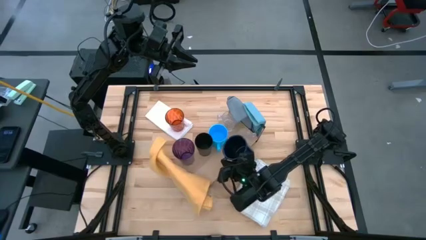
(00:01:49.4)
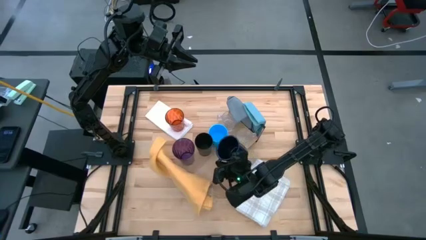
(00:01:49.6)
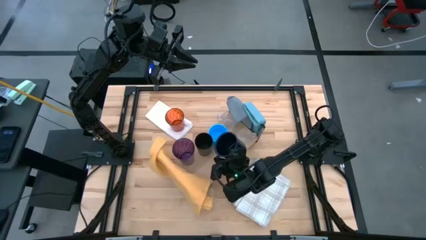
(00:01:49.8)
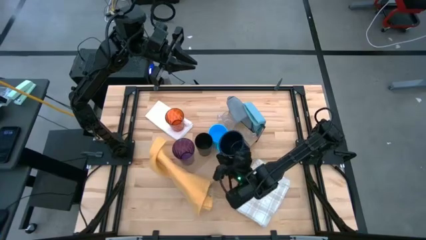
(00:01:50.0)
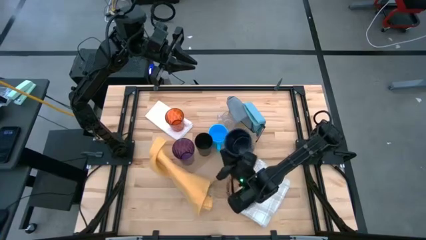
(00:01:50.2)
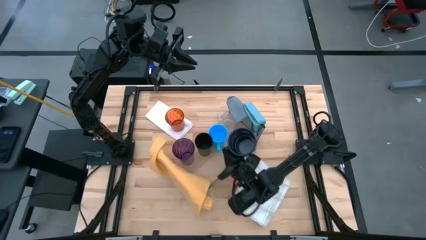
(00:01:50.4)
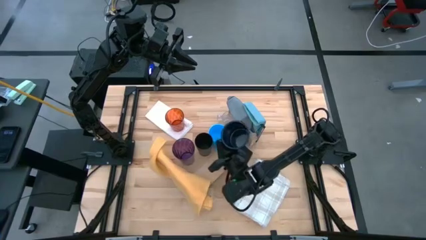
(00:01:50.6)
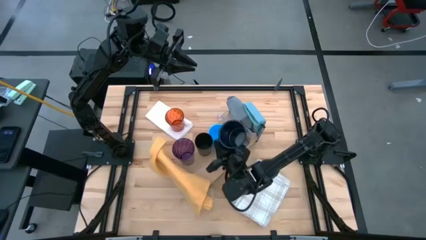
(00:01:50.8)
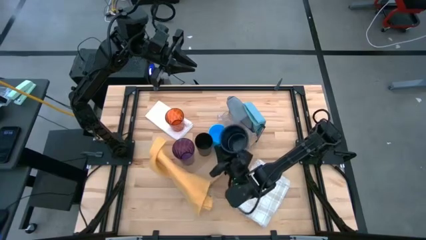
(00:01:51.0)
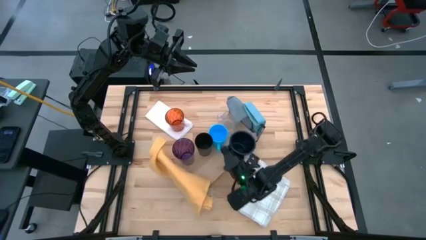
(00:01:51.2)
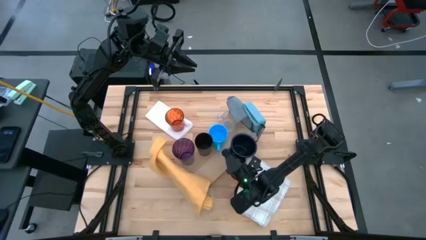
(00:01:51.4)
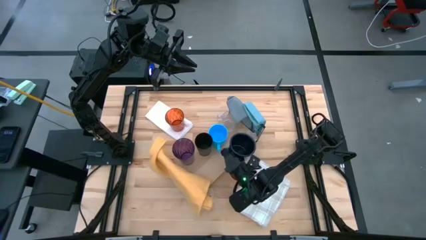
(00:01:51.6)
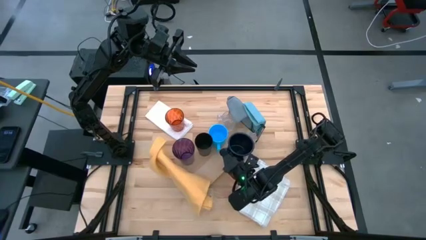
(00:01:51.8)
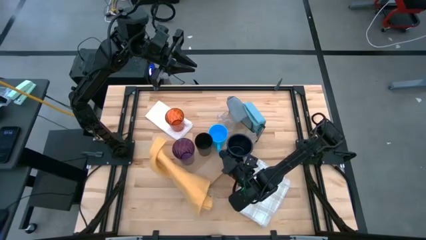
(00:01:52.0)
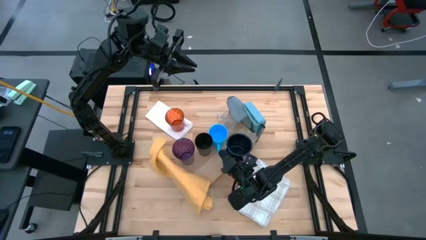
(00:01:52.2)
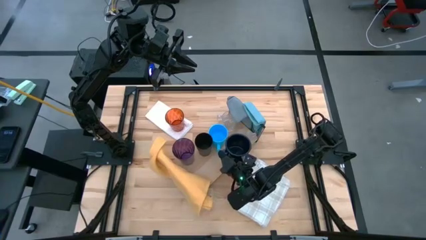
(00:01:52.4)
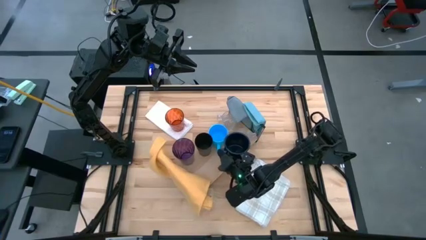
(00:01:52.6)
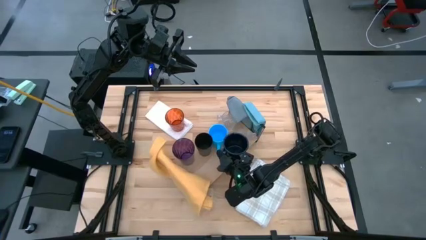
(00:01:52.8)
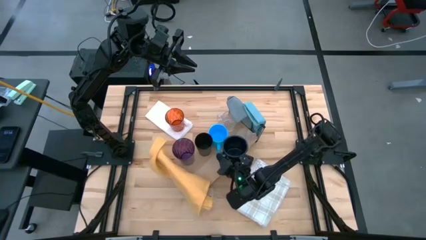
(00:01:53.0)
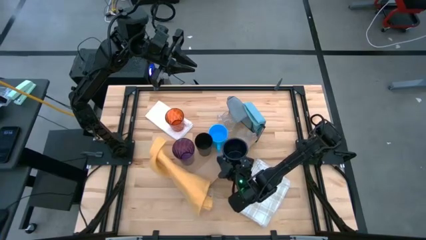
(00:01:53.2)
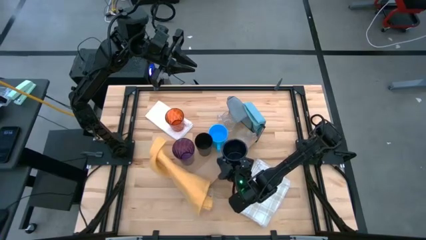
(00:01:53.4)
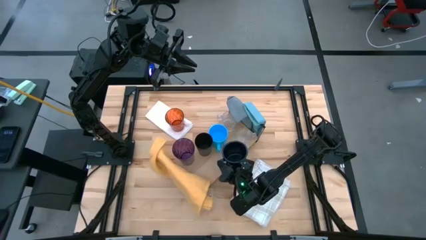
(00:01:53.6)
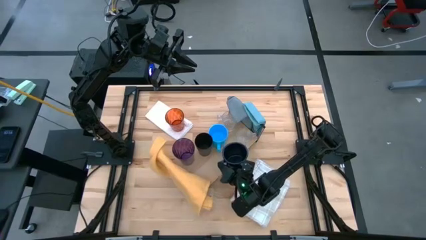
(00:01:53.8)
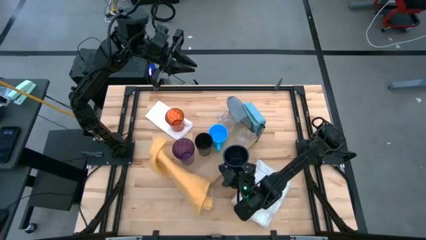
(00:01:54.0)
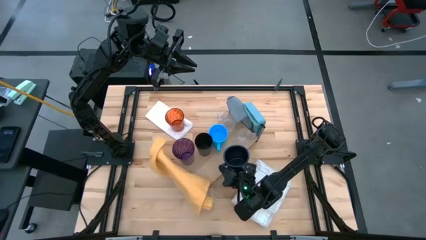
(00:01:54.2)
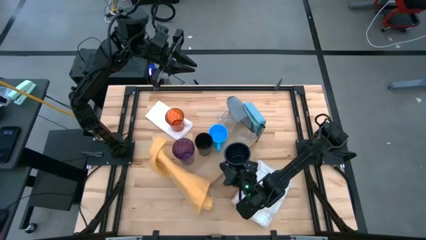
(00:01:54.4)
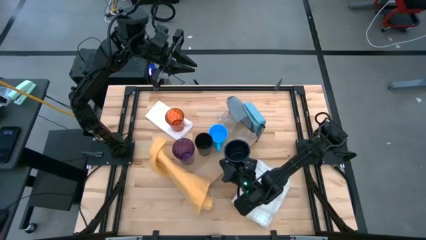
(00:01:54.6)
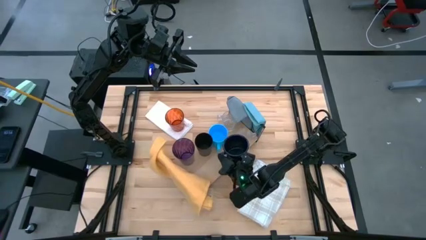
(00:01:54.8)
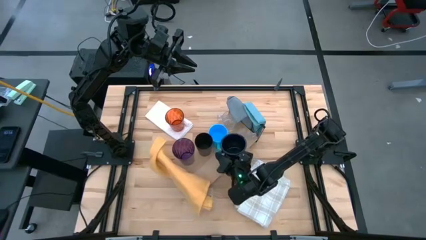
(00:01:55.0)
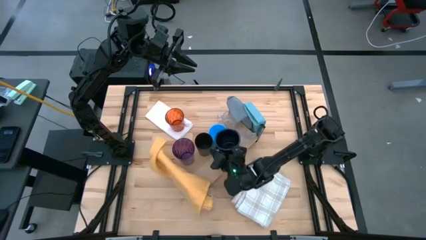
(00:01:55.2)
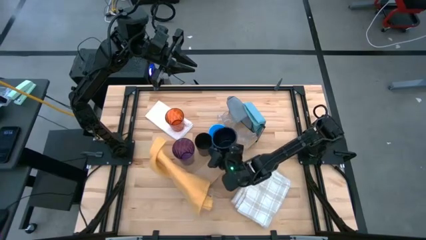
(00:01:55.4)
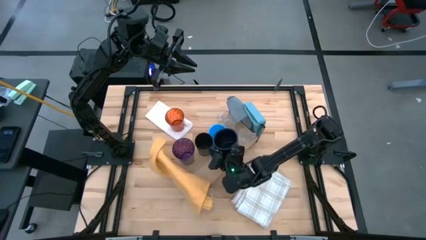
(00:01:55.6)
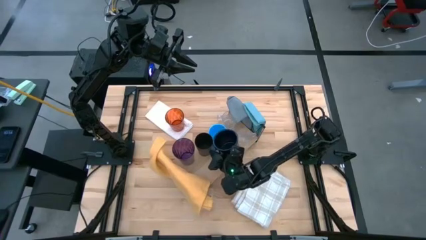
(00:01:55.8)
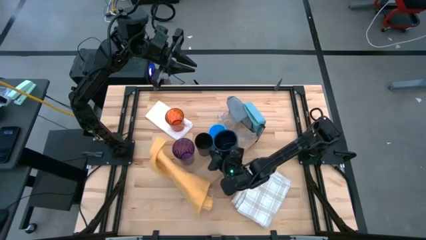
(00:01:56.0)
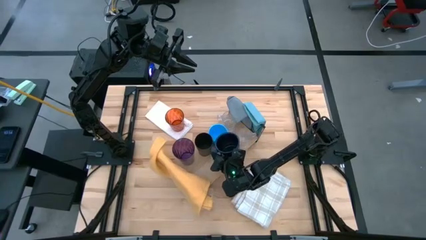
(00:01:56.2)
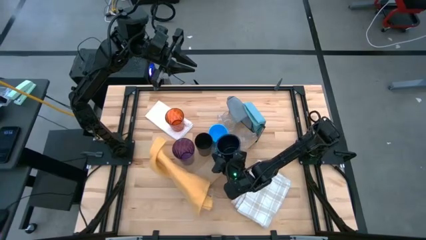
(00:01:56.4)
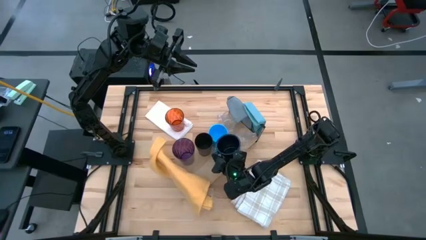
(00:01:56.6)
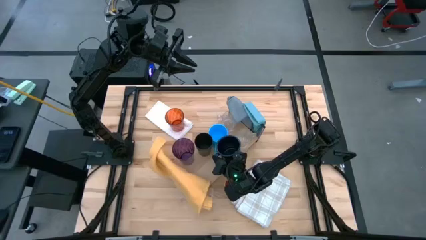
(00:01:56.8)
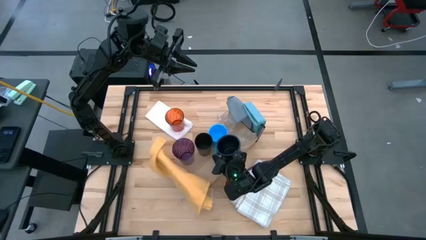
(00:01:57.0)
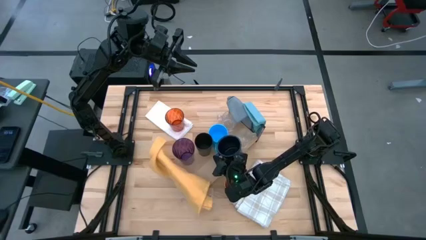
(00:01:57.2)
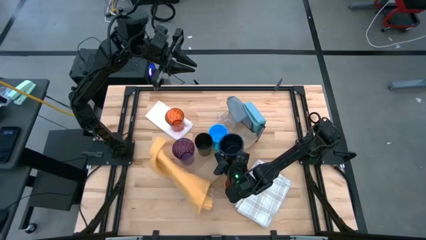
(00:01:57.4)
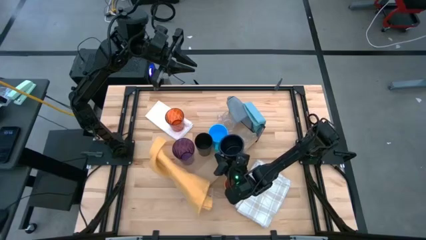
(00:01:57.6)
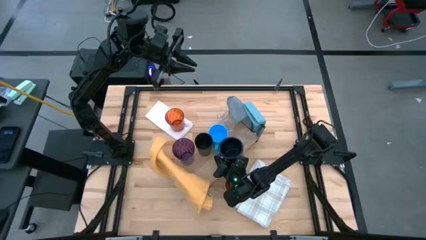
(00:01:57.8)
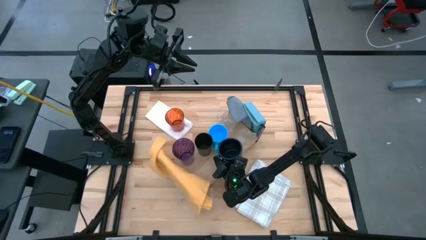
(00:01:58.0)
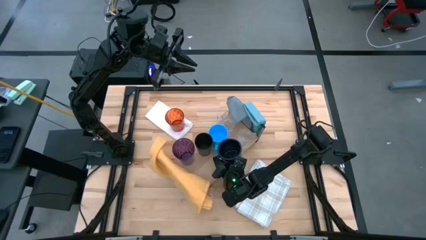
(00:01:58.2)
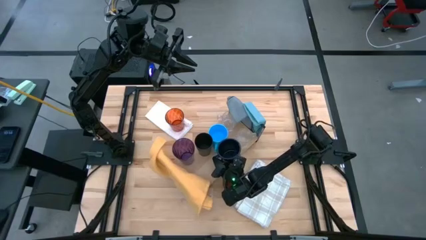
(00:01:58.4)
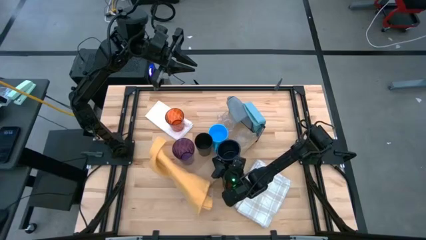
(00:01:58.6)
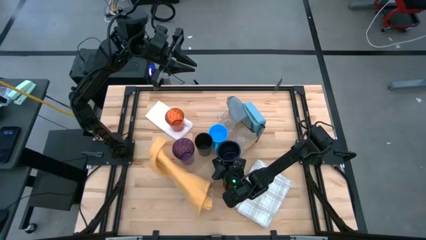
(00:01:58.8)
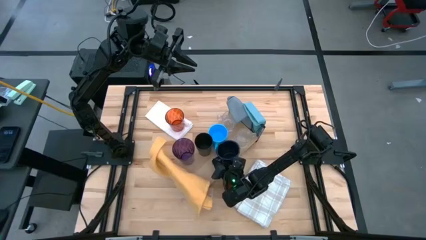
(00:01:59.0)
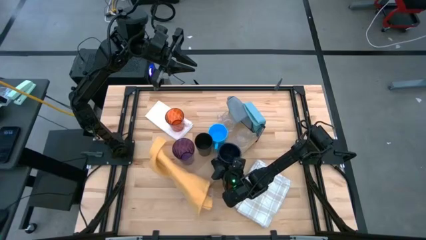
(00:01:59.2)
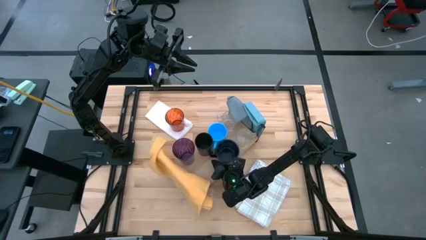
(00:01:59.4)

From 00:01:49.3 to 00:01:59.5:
Task: Stack small to large cups/mugs on shelf
Put the dark blue mug on the shelf
